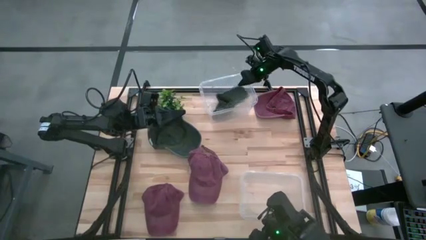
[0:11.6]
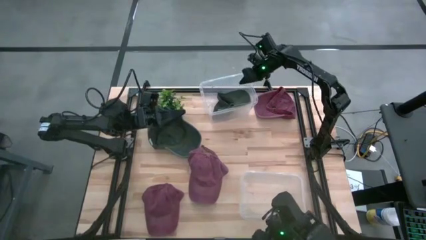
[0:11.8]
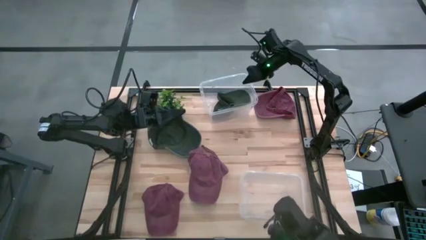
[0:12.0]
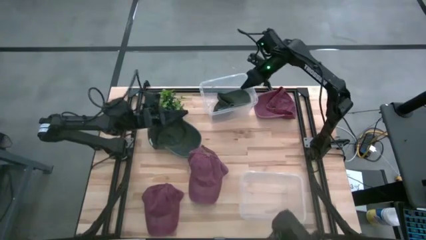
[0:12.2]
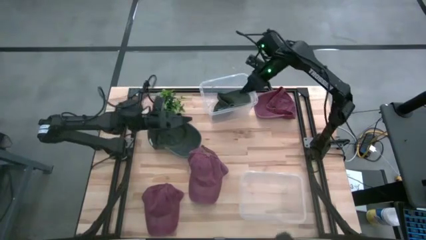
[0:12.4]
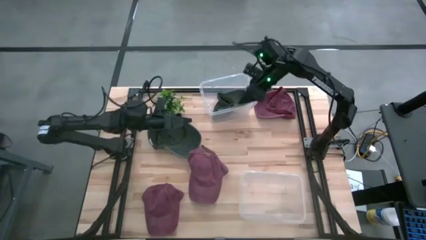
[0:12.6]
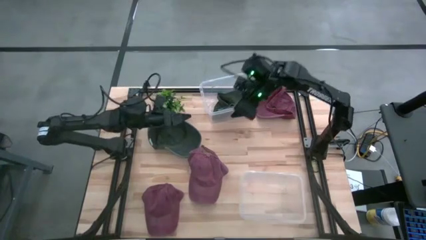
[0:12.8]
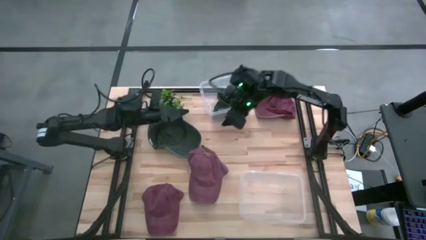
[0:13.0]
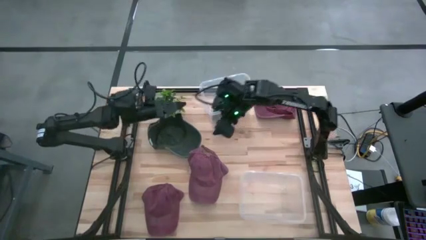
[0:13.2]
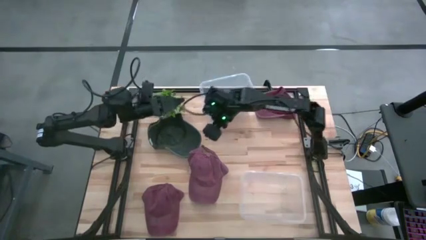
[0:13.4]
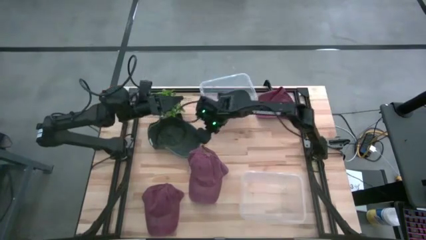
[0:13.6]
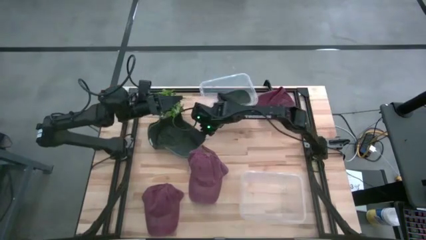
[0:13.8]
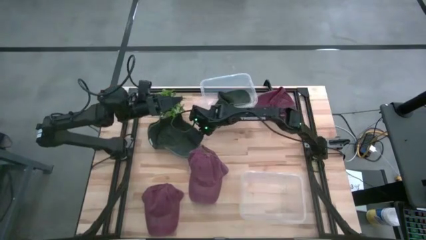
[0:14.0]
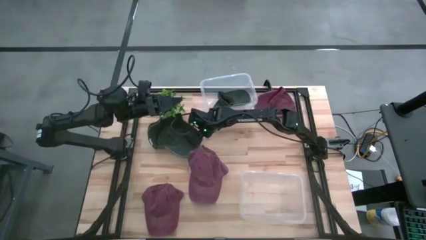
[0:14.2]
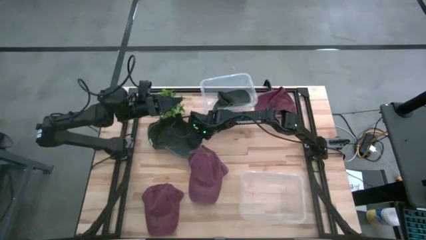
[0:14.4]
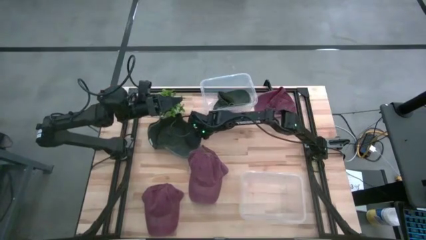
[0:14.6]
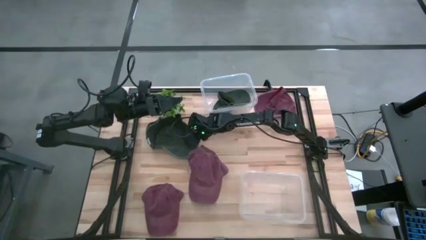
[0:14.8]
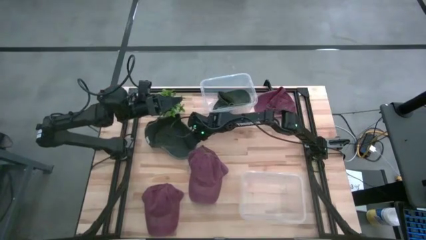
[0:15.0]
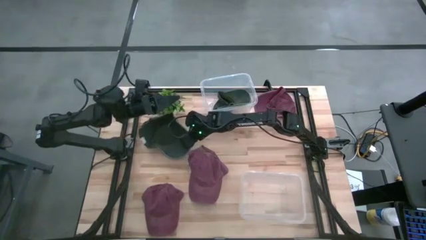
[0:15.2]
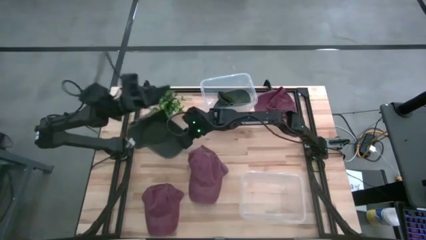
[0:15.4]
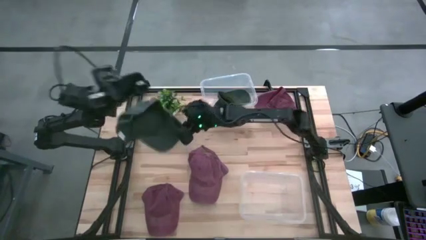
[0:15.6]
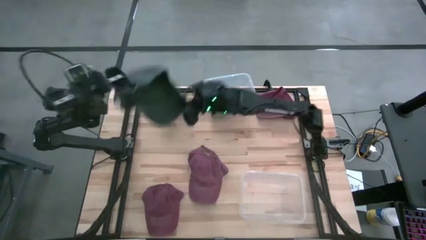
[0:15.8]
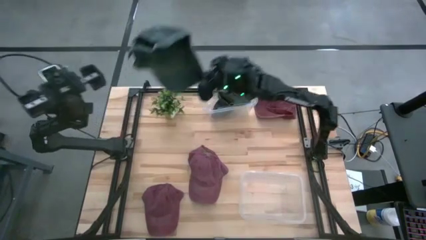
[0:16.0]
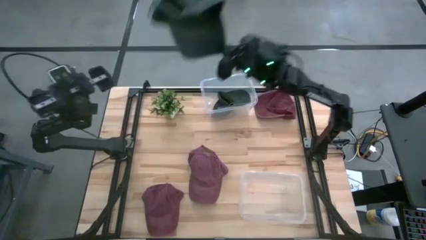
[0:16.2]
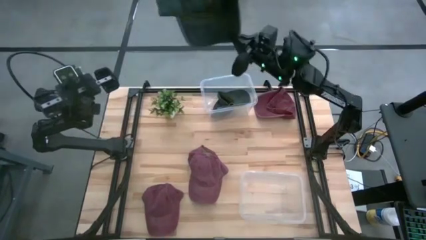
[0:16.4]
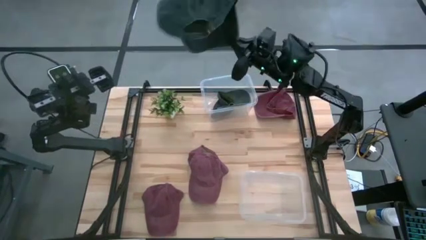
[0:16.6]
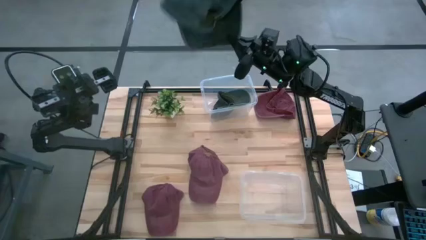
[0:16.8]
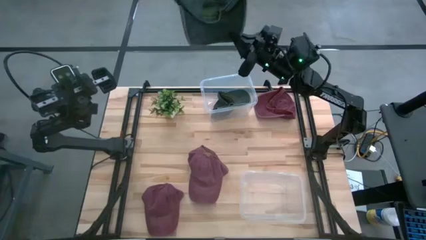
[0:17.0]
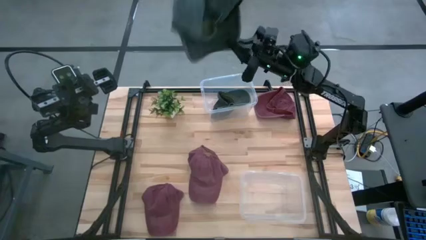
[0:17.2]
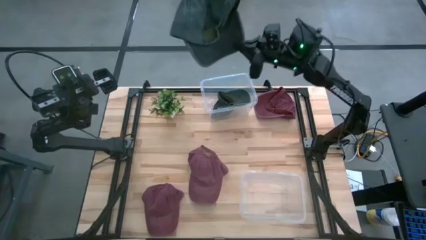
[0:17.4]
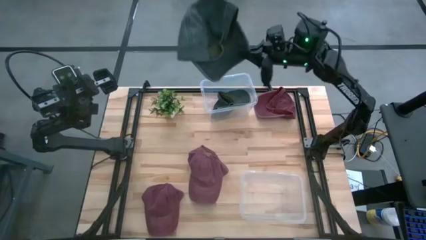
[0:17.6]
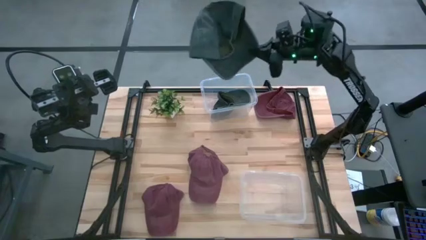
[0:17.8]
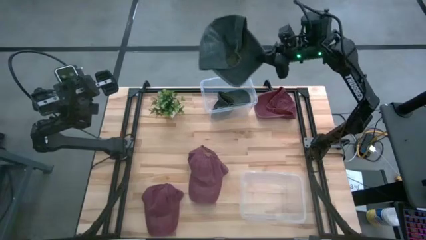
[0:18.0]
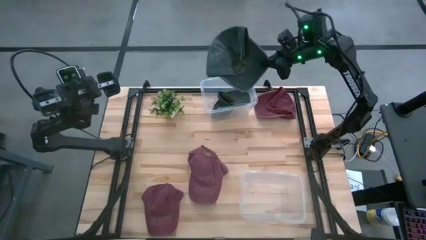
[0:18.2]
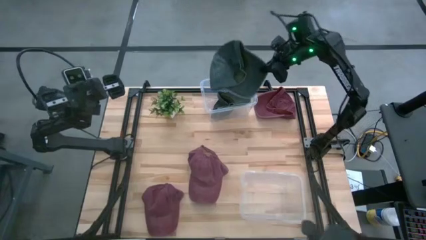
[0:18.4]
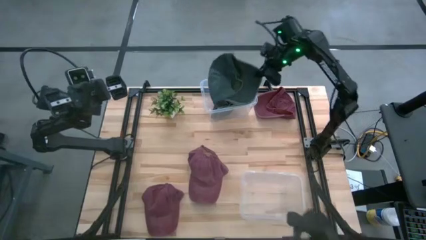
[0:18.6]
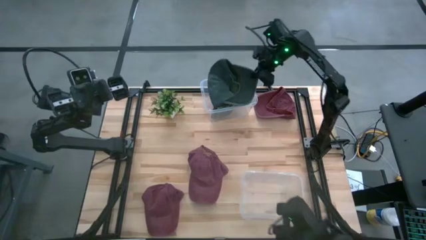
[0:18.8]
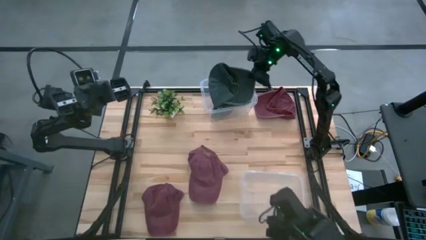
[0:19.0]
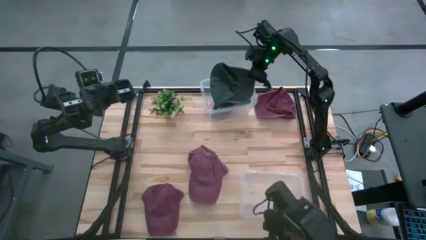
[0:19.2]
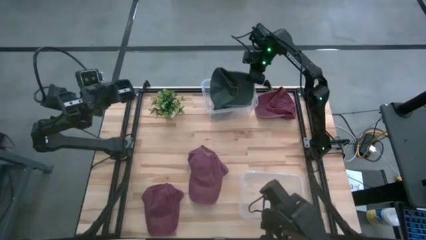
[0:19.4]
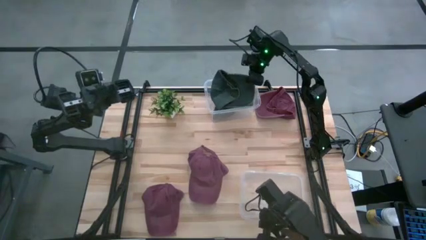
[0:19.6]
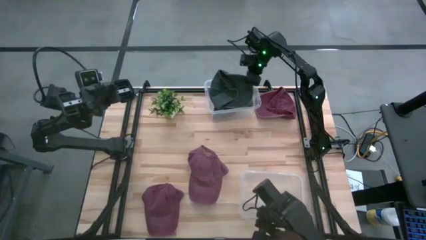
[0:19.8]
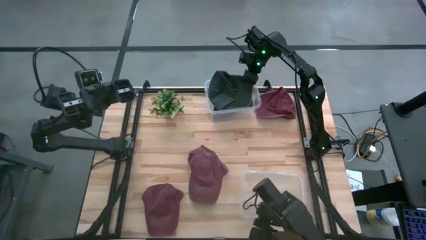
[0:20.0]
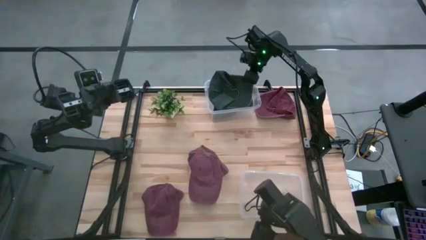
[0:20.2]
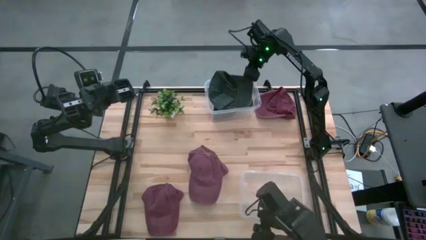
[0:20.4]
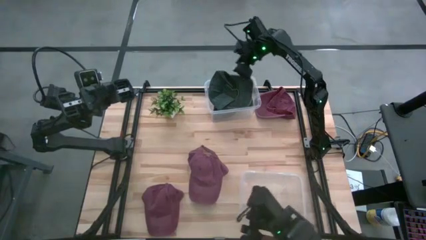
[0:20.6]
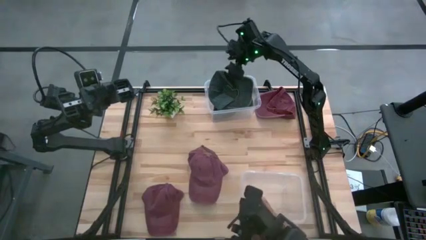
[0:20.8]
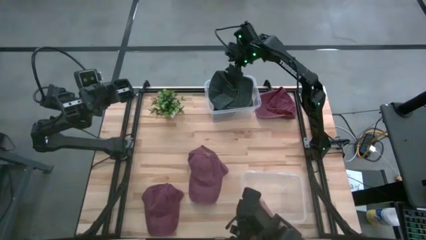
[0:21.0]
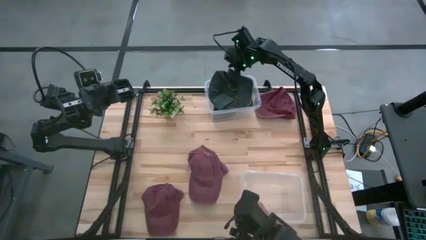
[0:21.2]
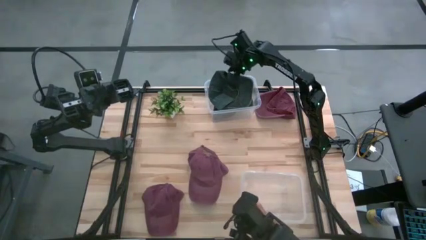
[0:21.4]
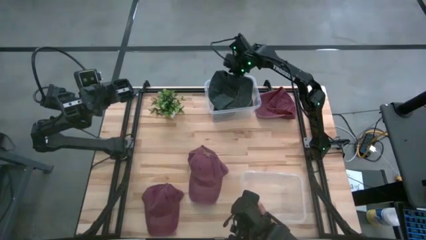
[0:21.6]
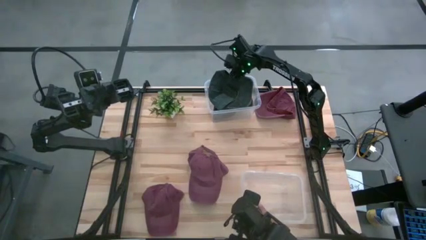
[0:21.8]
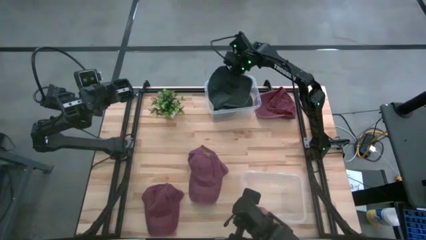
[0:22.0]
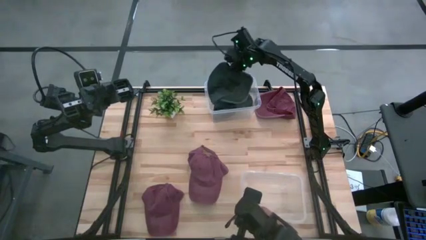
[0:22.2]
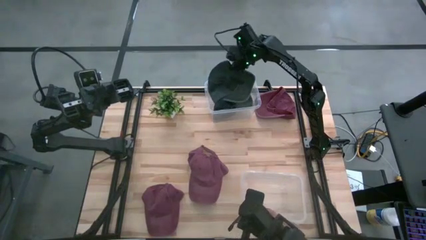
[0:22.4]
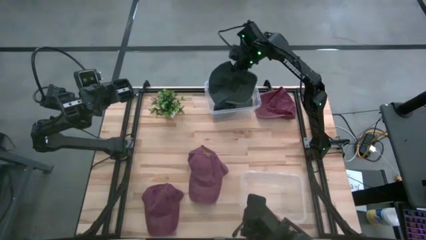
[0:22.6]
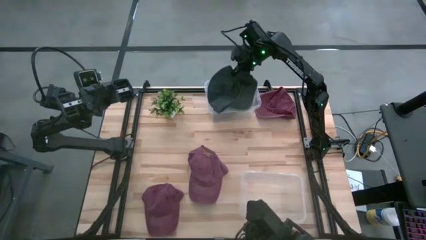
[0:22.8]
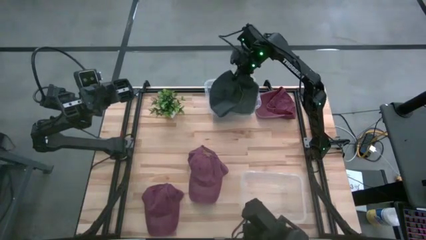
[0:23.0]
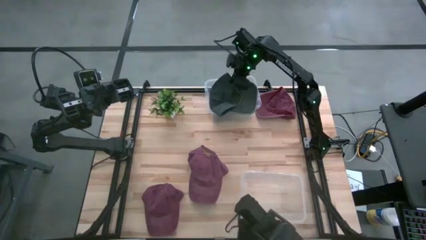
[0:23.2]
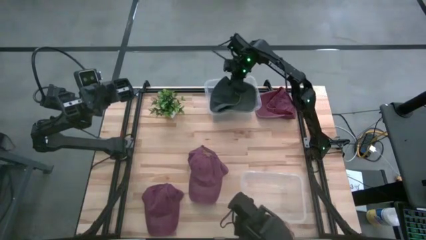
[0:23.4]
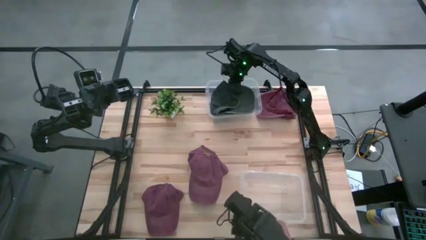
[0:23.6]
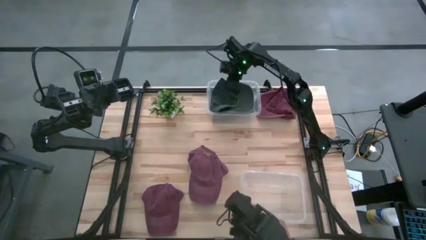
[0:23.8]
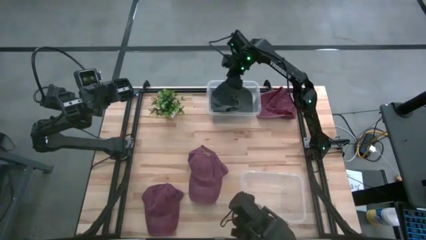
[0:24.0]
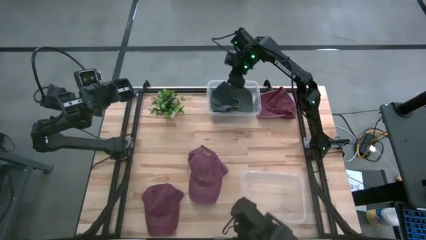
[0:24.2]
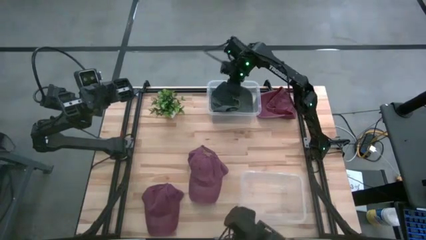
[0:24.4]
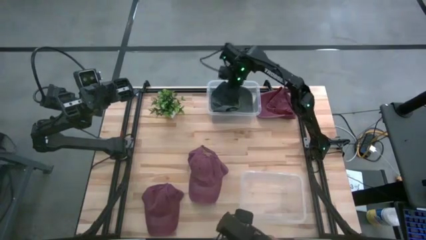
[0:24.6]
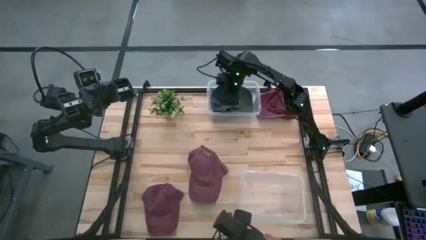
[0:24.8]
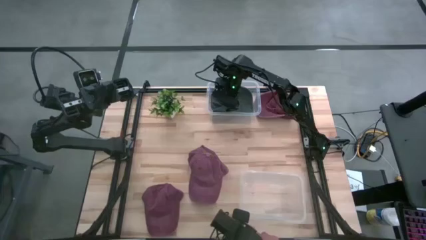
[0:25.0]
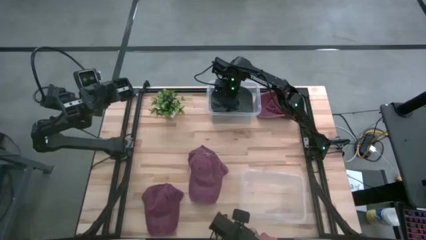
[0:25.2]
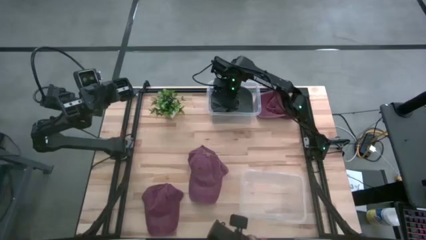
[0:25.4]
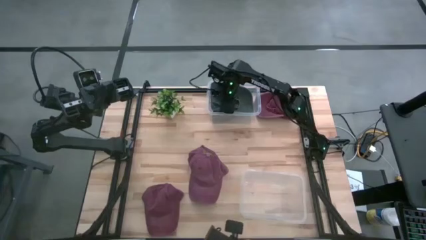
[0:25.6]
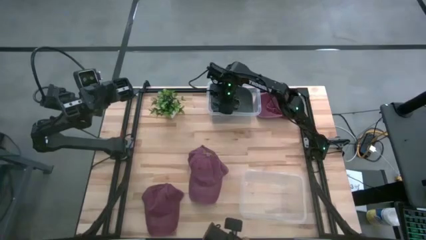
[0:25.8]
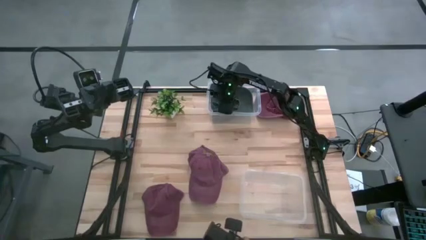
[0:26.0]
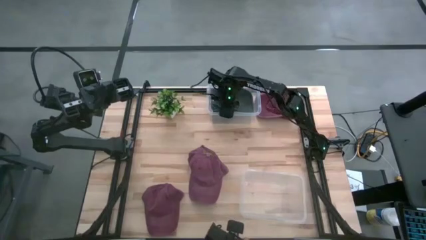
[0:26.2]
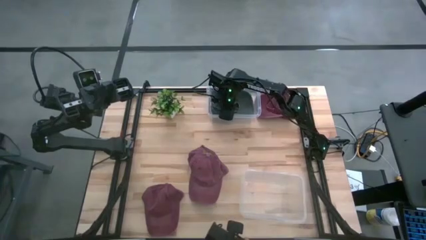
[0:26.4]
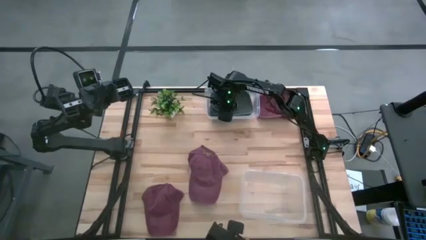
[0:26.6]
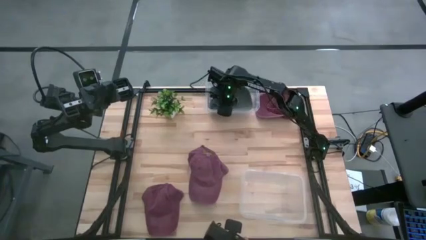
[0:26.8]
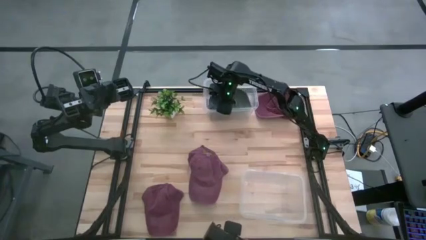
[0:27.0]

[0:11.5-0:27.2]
Task: Pick & Place hat
Put the black cap in the top transparent bin
